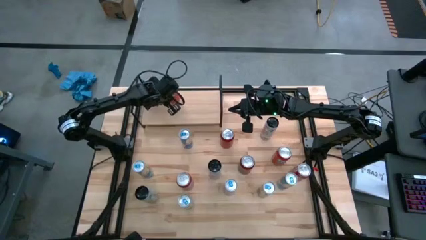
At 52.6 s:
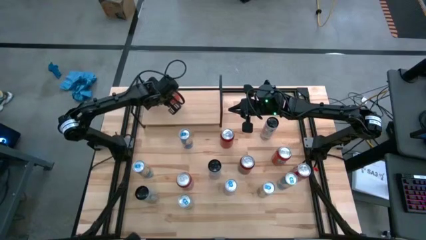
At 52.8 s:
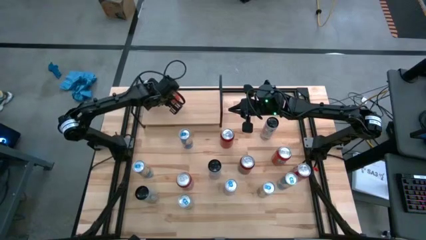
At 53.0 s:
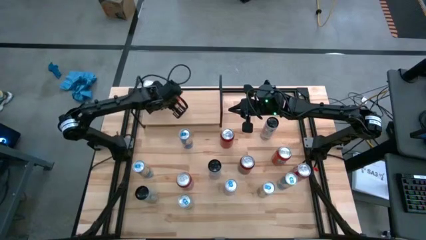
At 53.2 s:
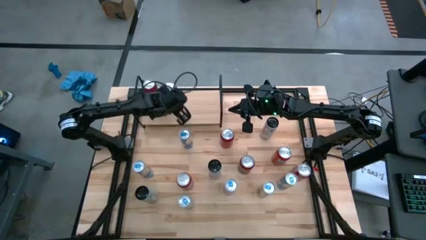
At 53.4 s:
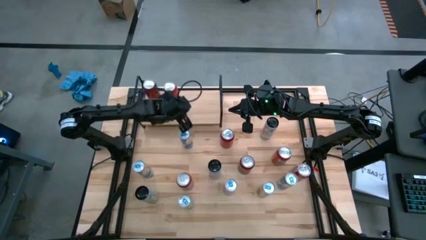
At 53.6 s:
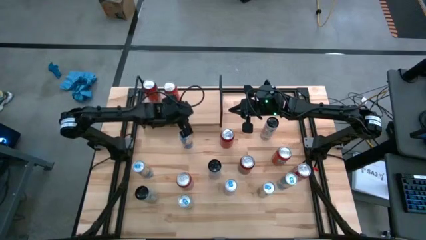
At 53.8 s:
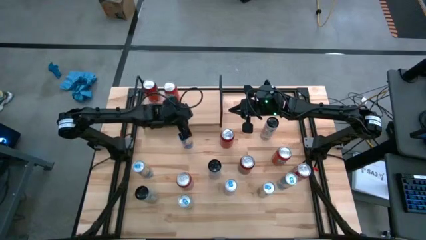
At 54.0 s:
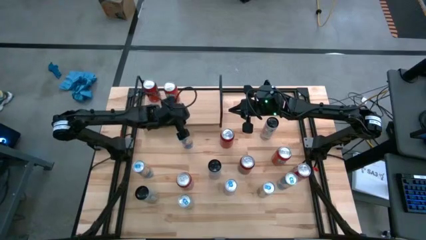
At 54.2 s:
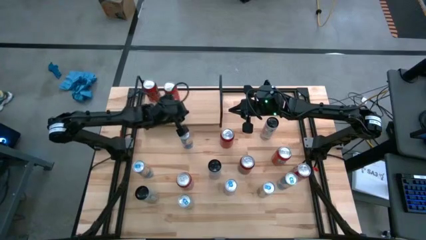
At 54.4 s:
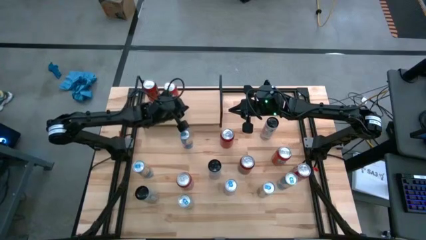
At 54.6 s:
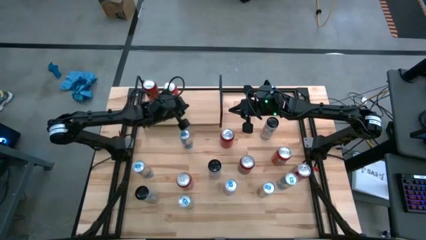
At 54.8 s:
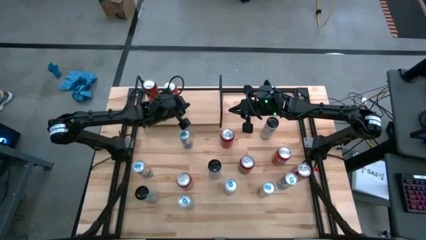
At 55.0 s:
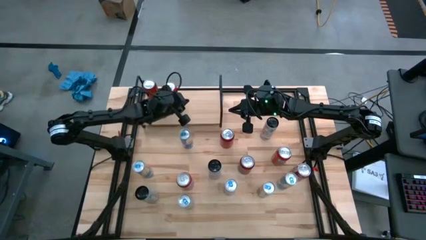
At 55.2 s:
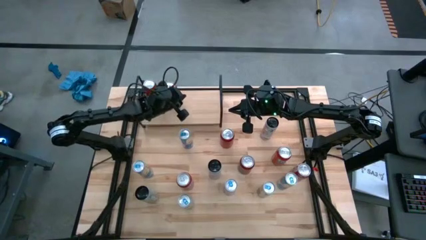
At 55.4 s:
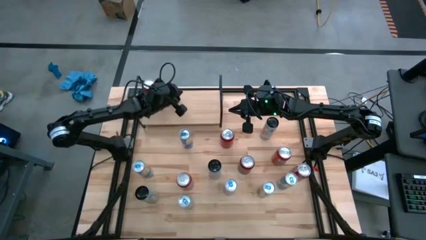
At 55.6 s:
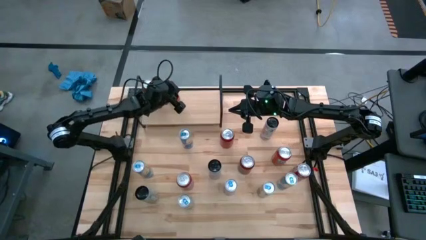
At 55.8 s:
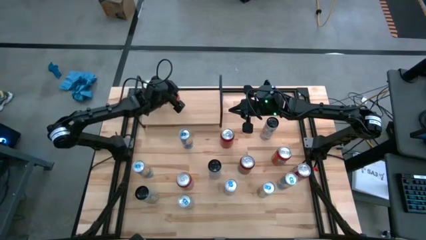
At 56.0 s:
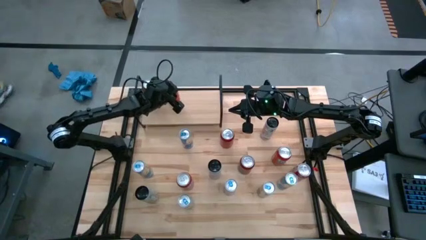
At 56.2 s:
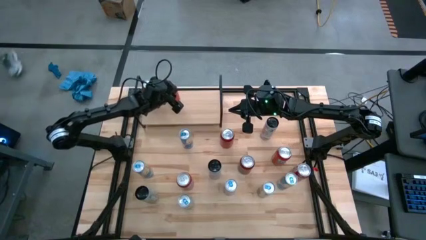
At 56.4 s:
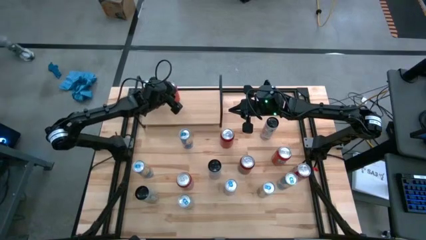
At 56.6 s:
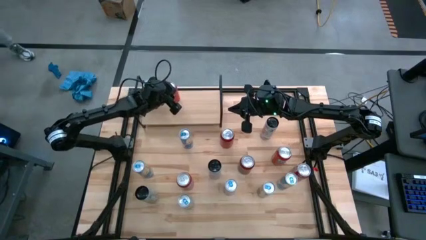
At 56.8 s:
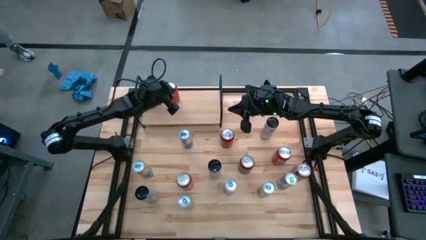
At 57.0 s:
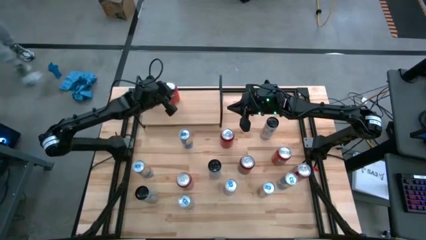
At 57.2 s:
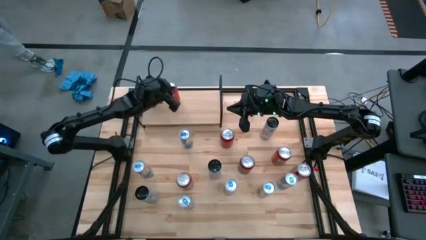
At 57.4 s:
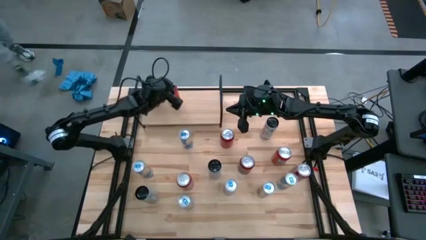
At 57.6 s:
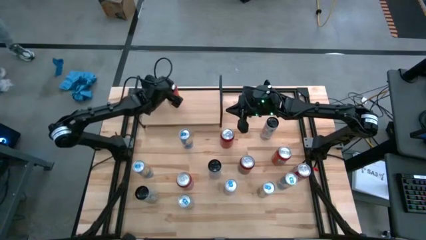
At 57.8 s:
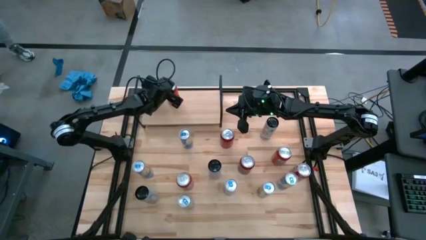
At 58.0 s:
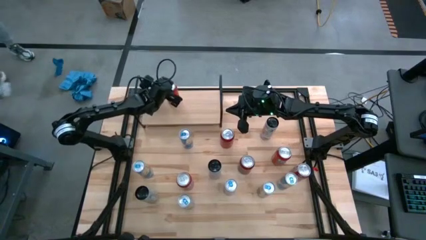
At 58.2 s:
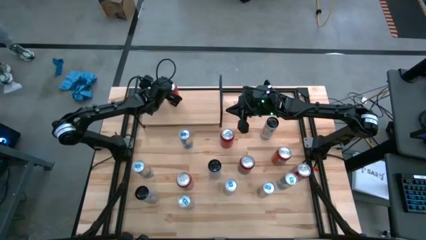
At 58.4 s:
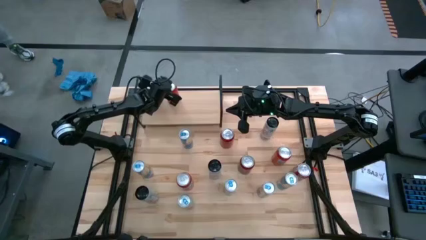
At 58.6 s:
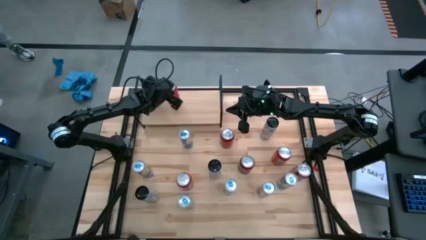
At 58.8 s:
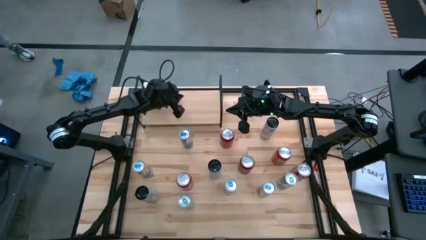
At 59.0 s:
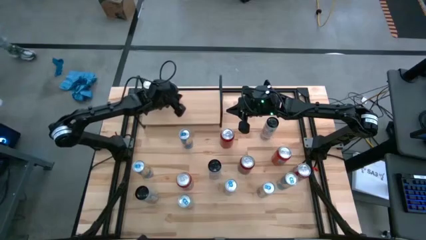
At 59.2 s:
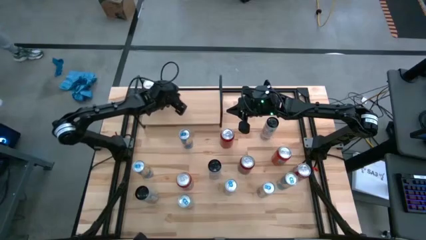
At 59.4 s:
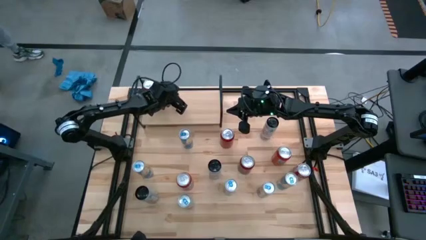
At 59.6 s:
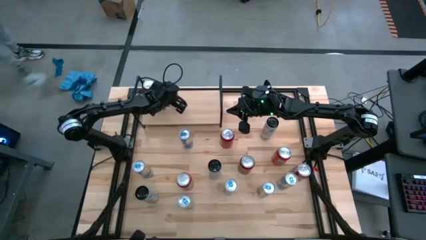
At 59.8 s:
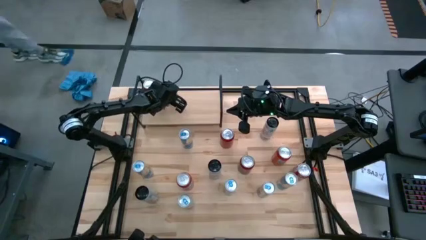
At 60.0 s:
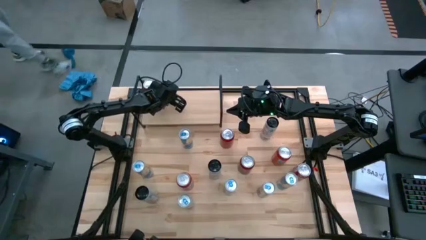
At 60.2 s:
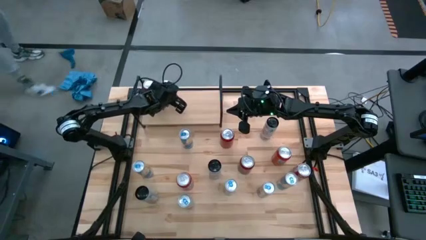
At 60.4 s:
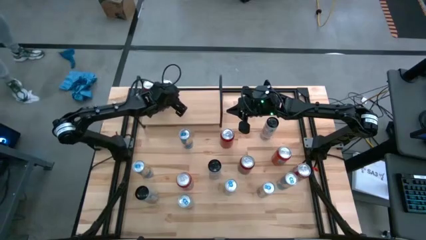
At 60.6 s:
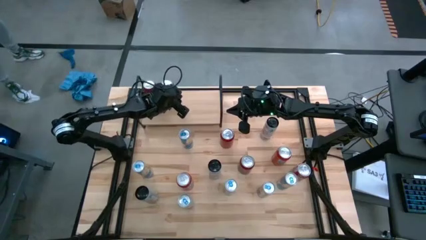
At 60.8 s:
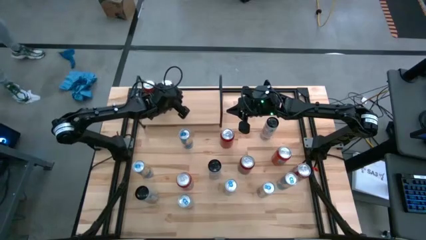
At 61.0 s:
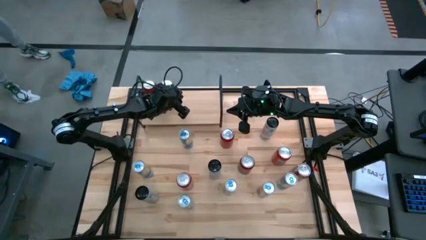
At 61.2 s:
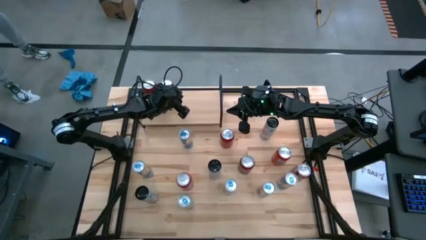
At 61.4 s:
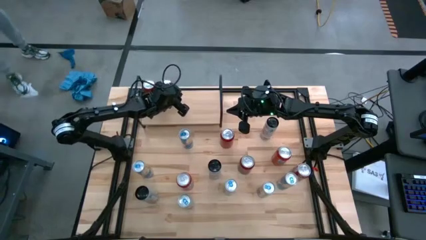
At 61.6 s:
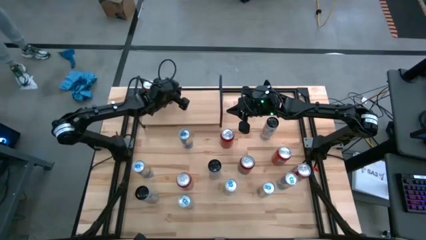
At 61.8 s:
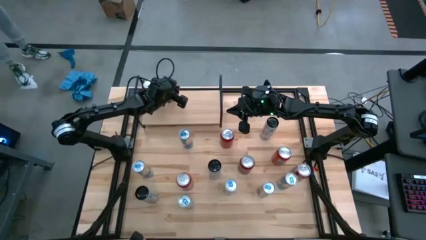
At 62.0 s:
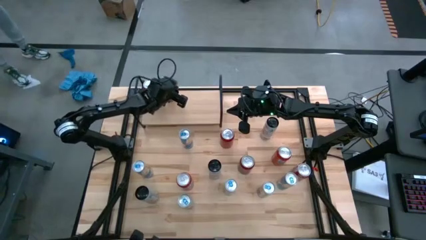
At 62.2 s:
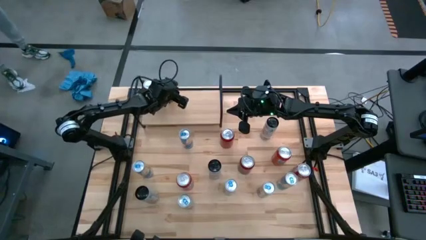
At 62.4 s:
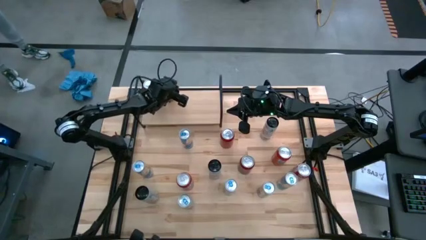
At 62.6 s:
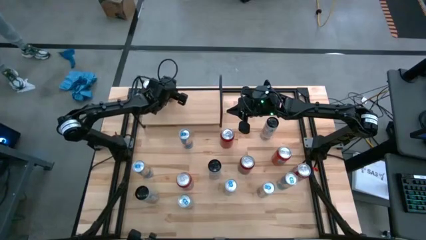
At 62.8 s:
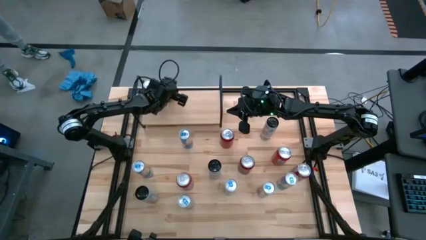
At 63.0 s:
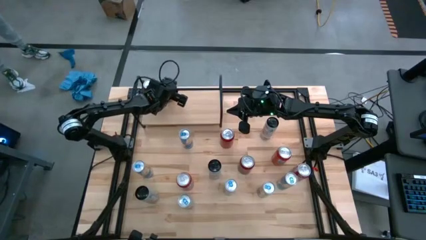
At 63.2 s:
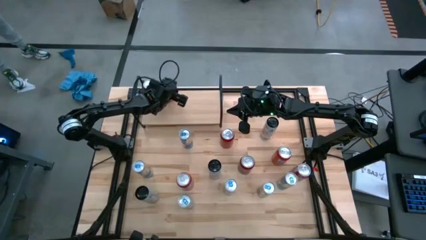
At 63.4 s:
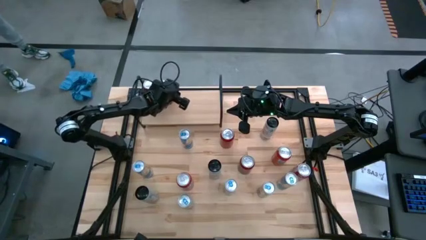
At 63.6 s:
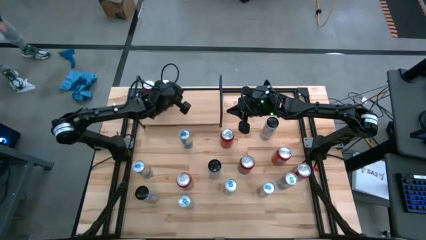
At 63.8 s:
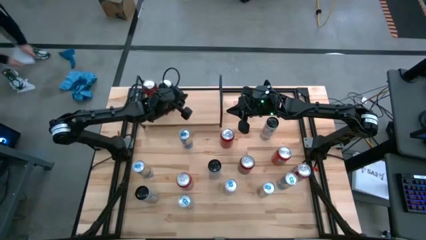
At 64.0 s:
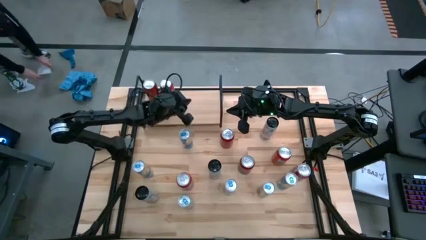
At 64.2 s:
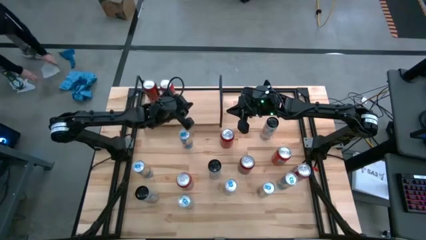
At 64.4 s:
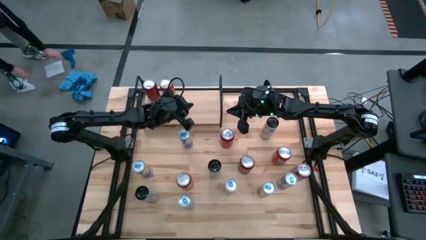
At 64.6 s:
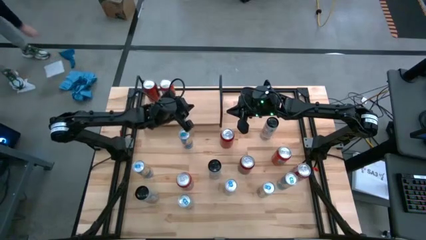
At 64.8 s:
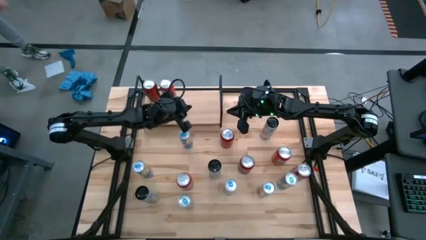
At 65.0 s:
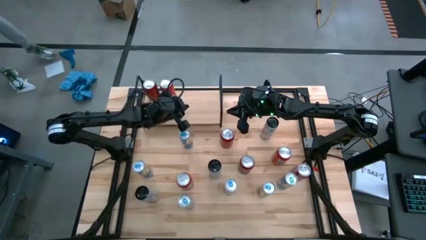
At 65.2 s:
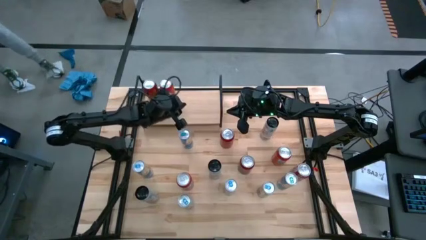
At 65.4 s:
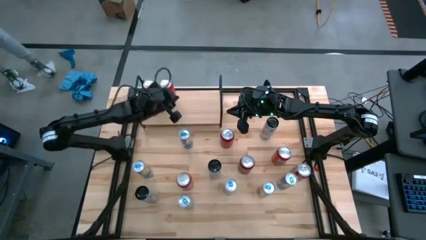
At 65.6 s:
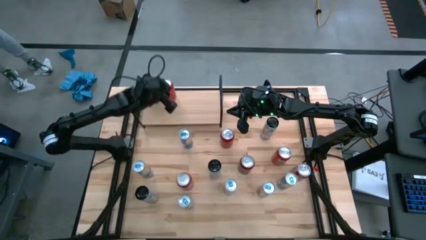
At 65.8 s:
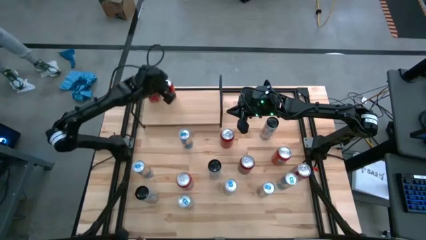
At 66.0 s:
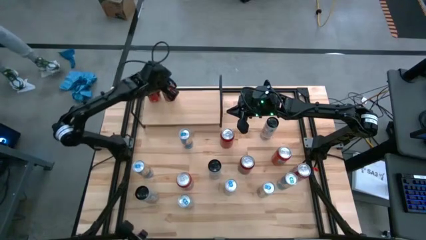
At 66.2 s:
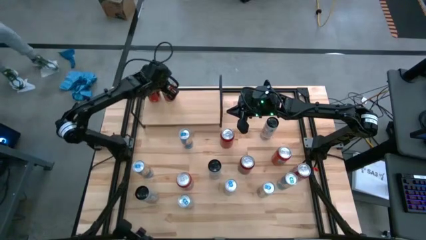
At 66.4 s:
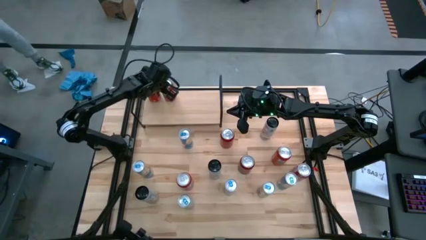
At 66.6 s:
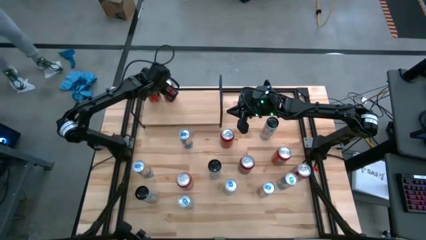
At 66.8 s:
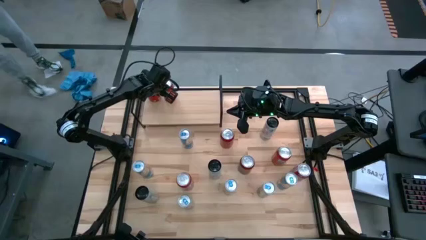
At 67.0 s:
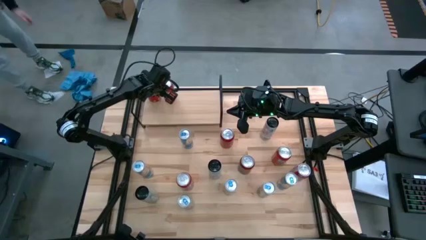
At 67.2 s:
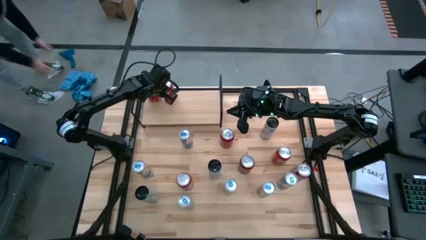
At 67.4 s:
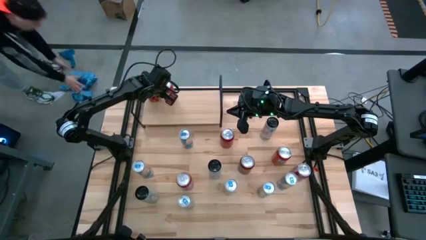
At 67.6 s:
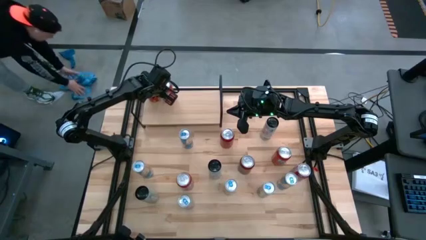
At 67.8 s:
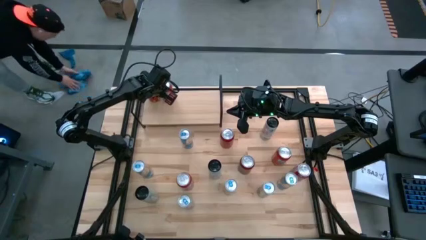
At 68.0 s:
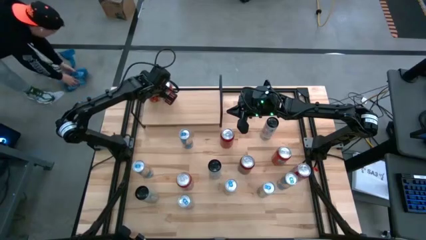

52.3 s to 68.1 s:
Task: Place canned beverage on shelf
Put the red soda can on the shelf
